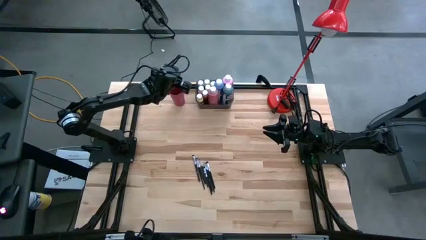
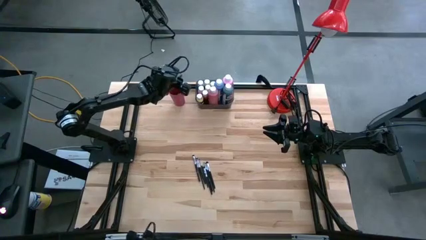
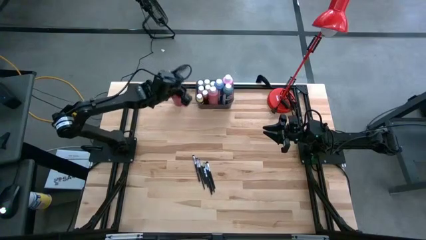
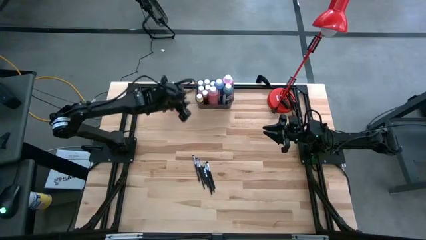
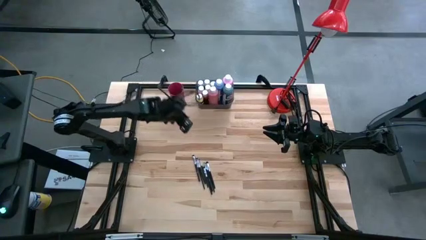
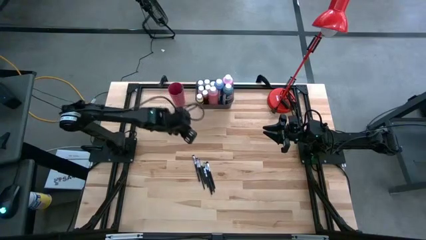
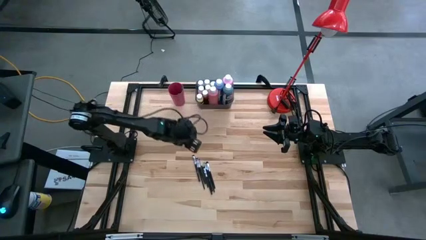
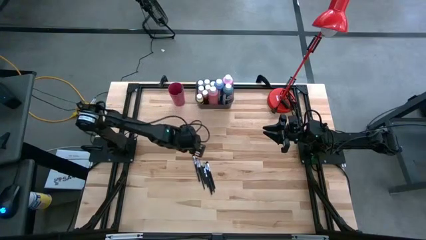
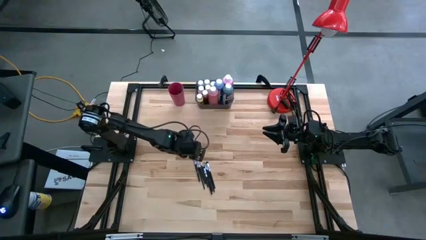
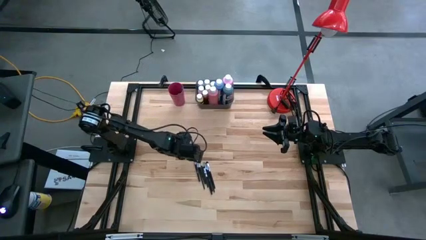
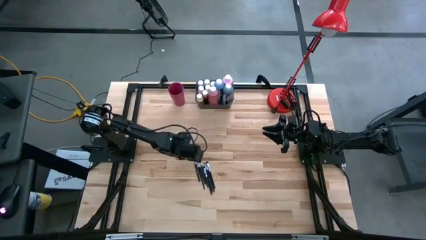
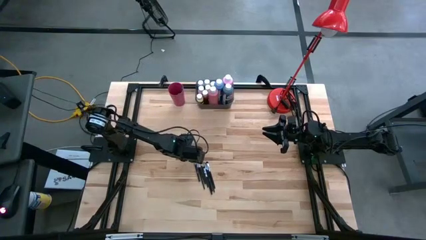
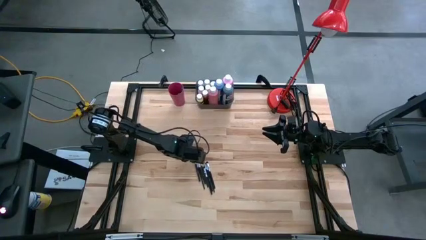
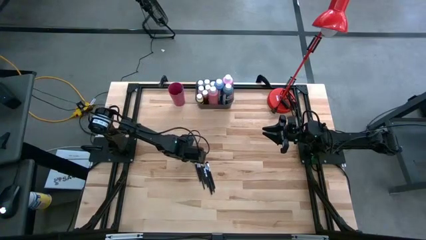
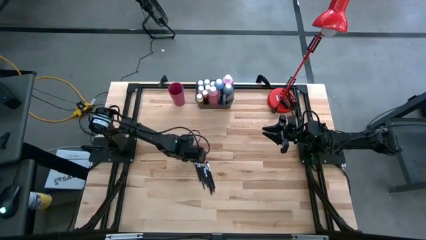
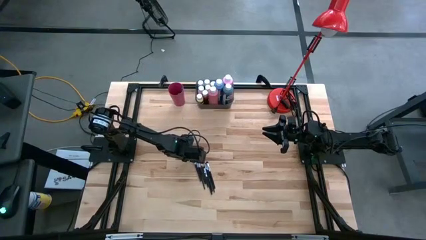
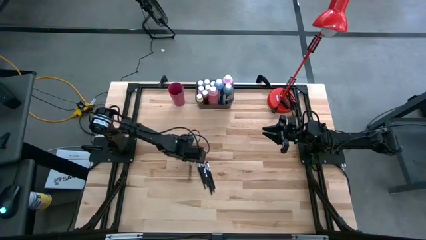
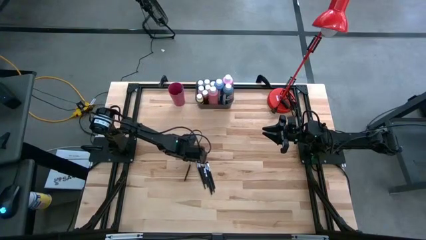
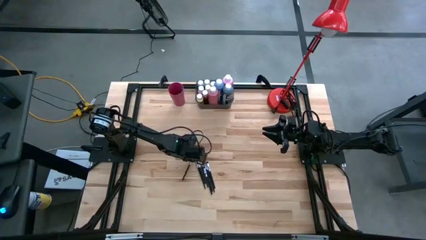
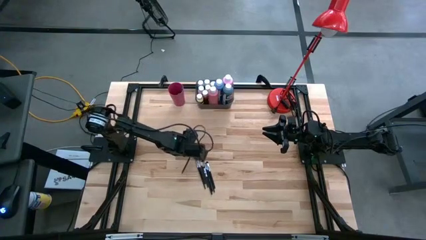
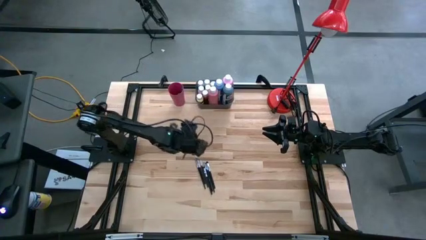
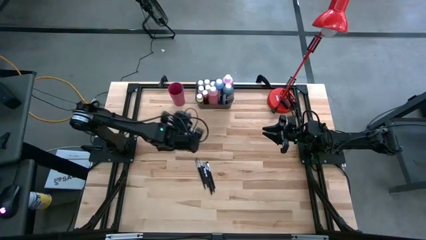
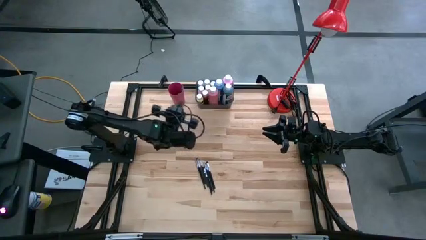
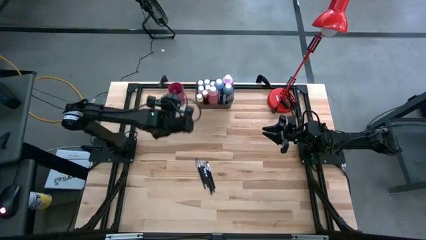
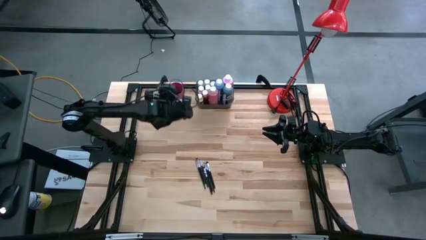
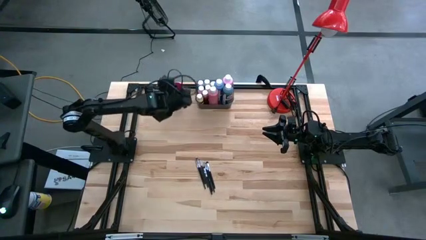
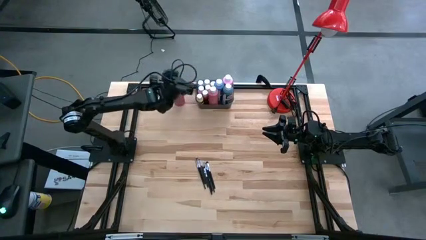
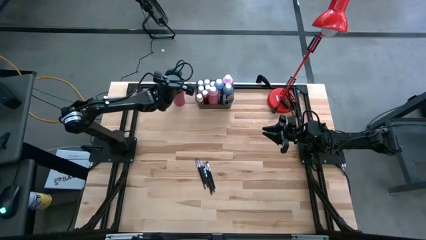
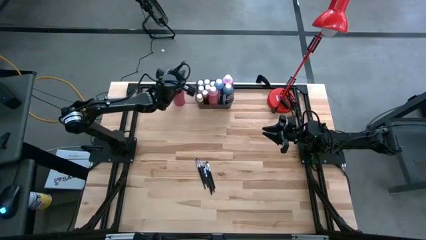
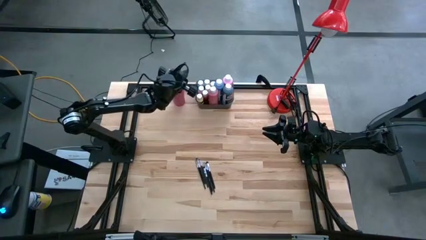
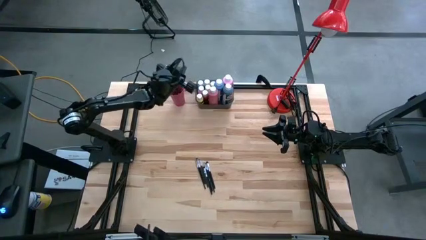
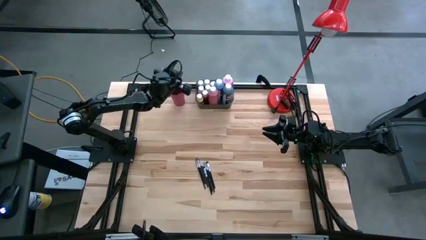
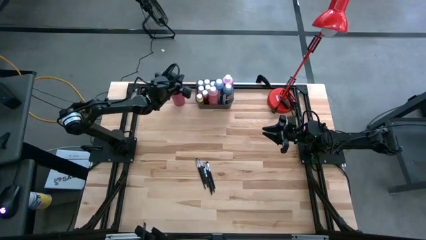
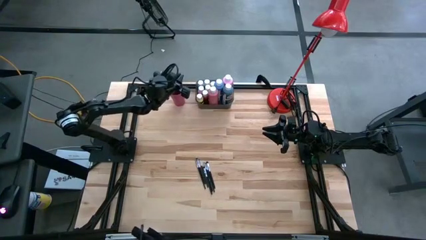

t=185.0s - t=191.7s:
Task: Pick & Place Paint Supplies
Put the black paint brush into the pink cup

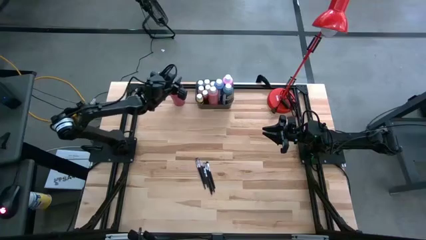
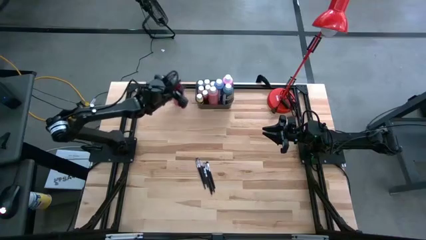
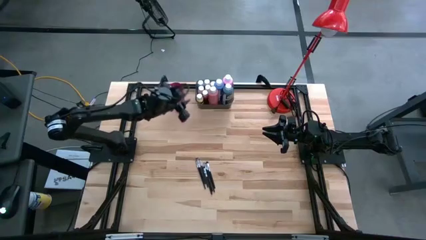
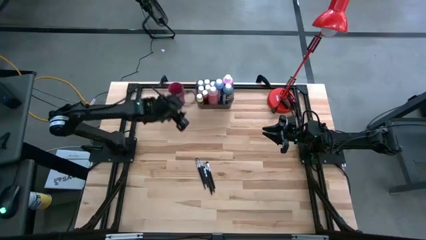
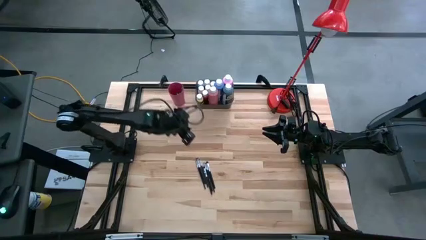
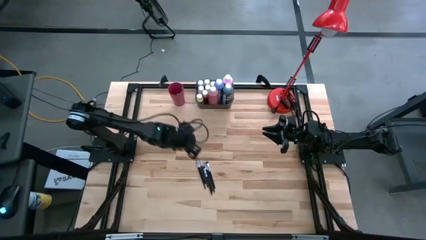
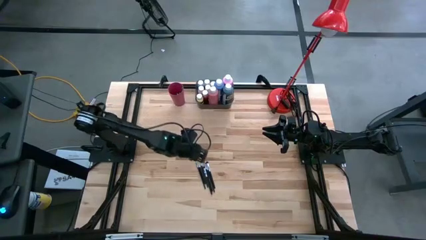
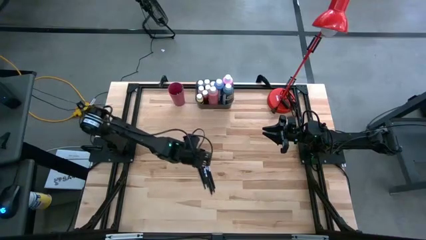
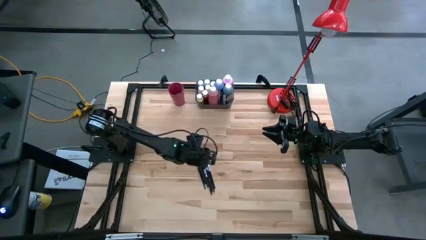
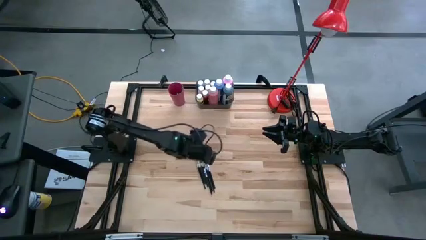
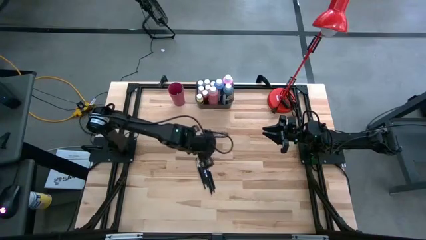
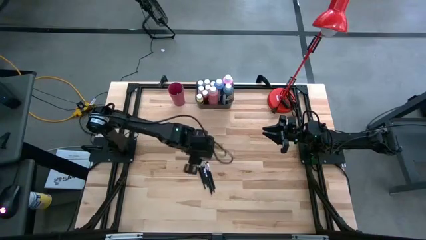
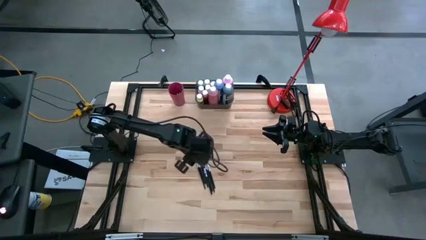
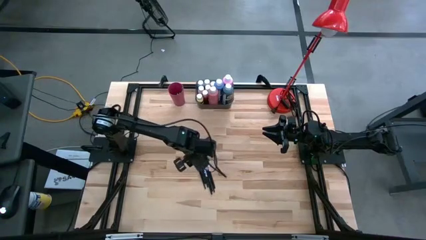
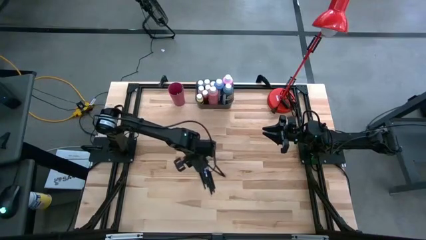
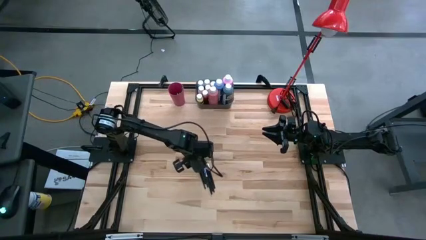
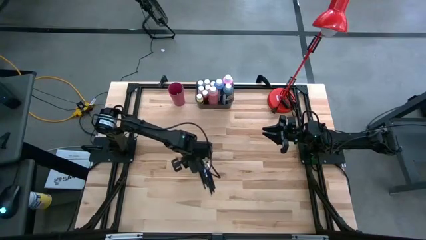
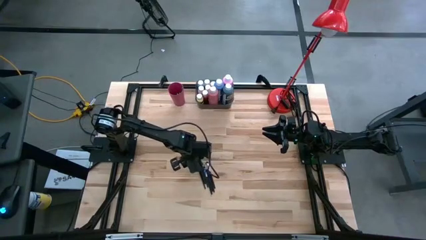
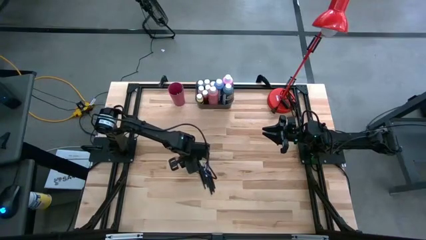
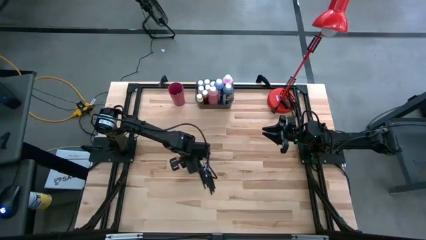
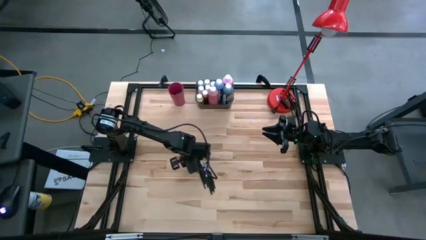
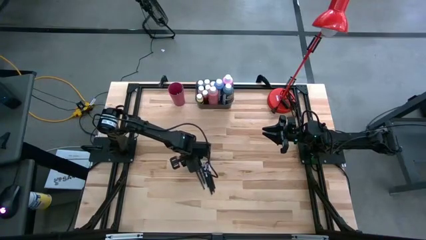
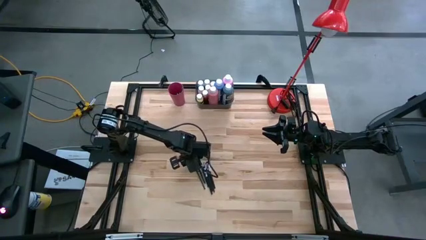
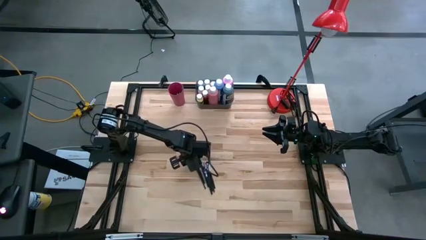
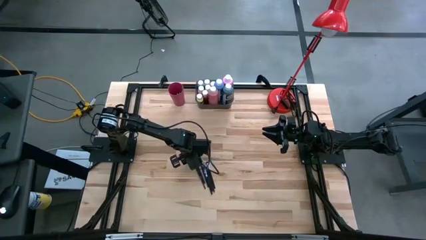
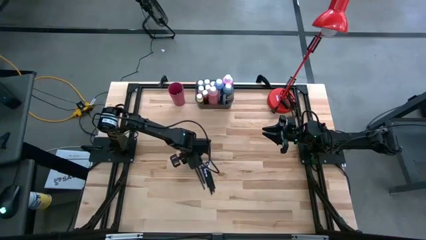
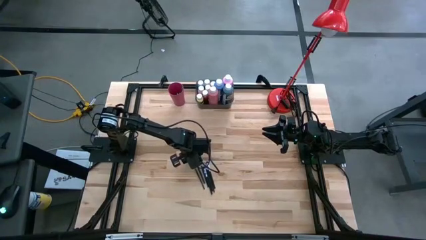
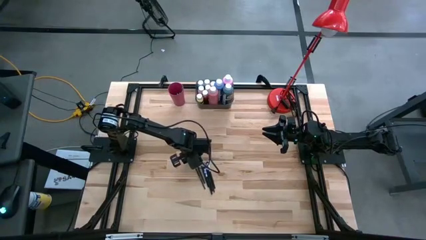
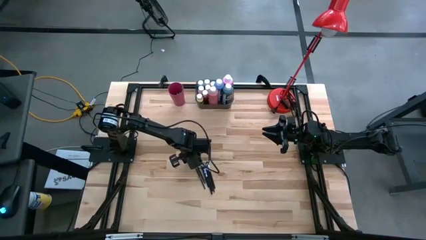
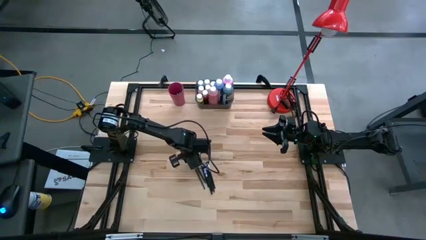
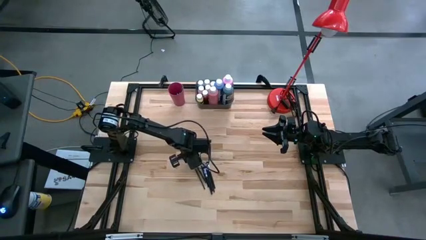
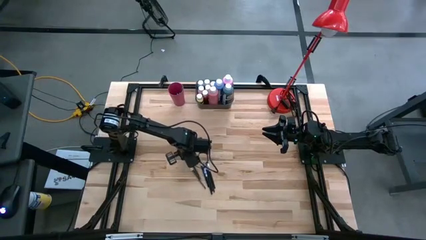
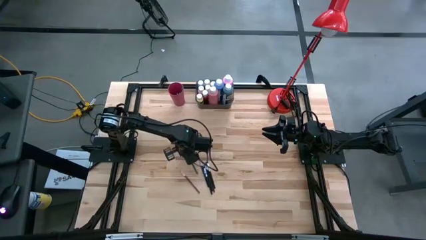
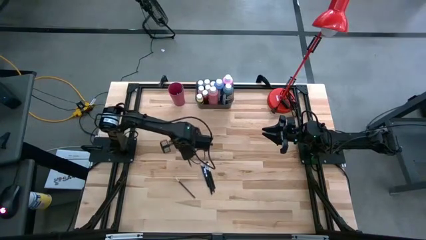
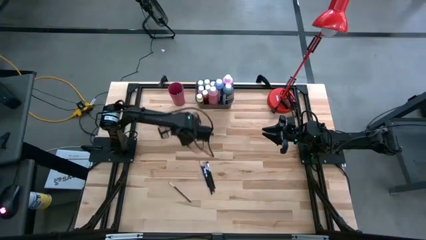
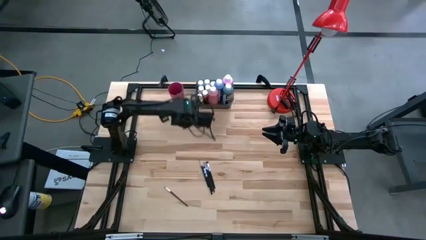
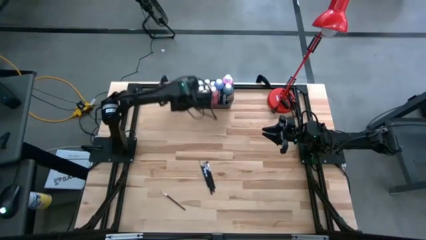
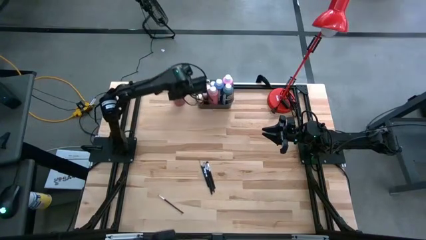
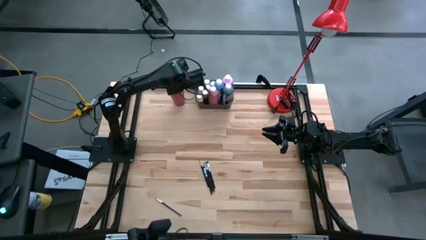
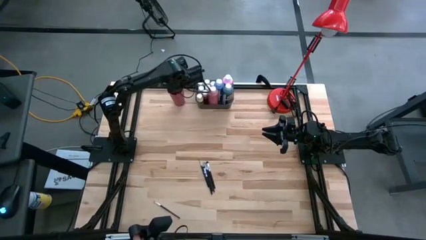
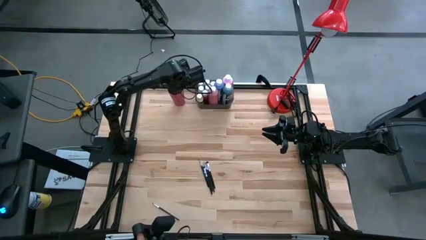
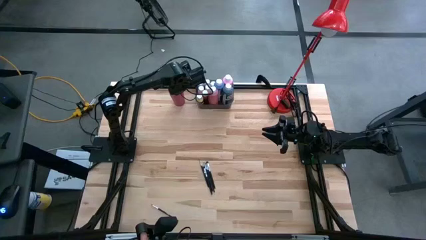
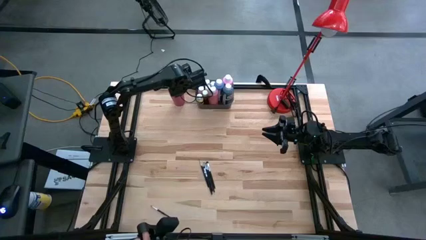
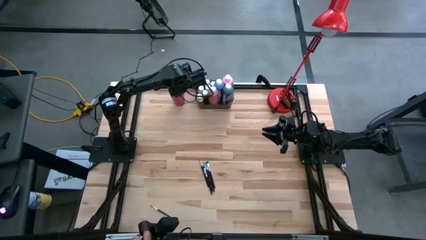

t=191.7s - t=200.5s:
Put the black paint brush into the pink cup
